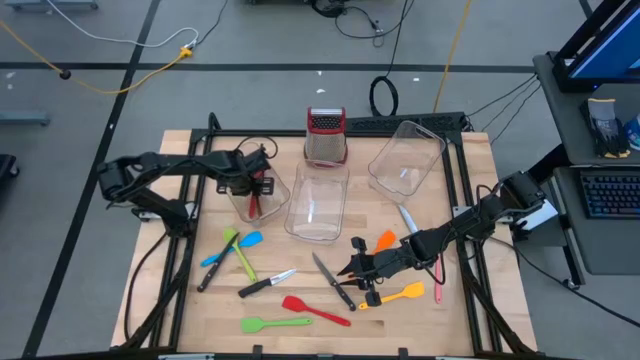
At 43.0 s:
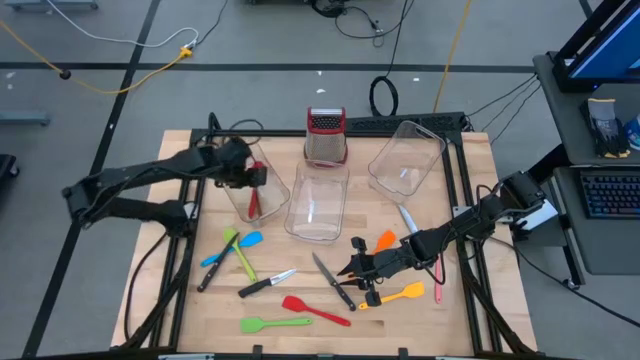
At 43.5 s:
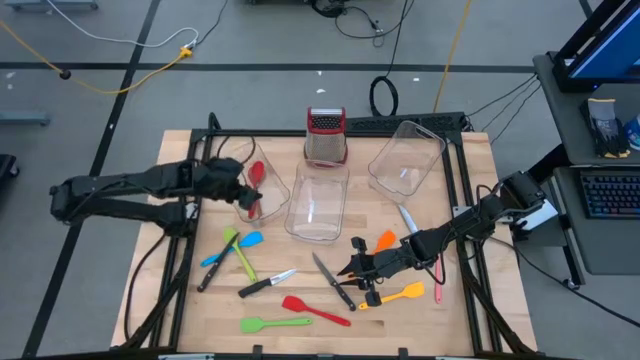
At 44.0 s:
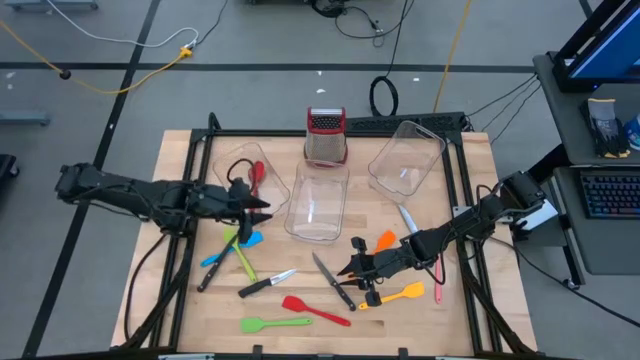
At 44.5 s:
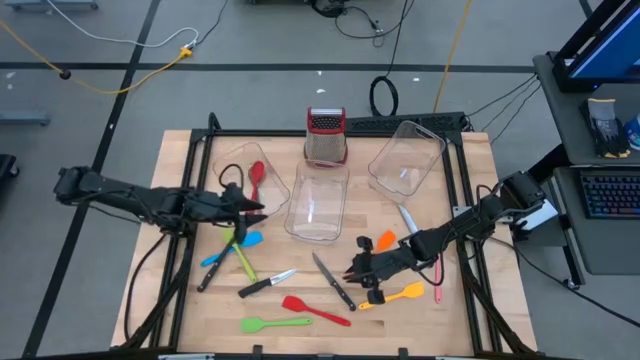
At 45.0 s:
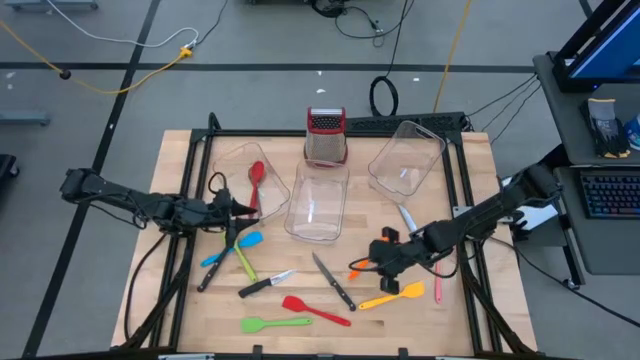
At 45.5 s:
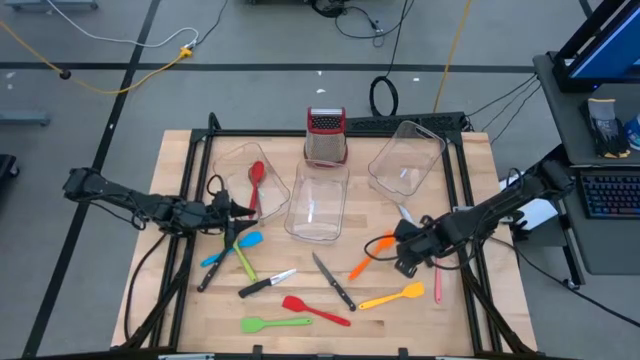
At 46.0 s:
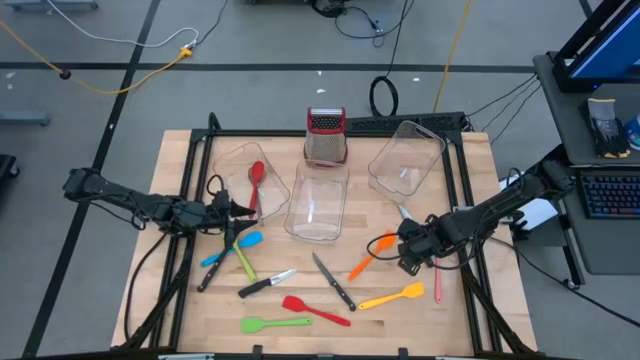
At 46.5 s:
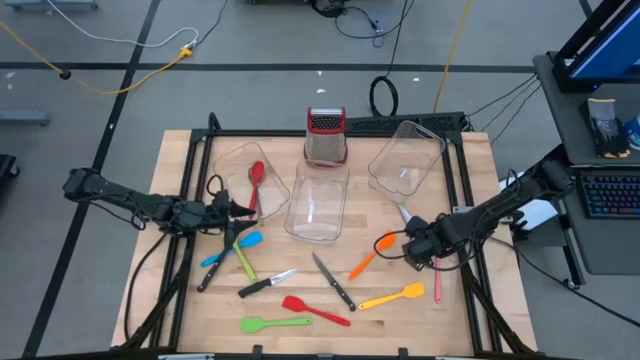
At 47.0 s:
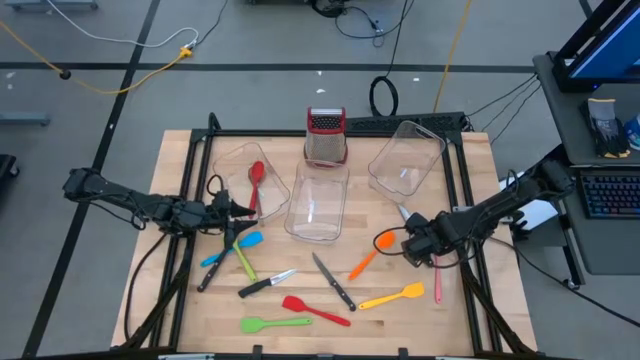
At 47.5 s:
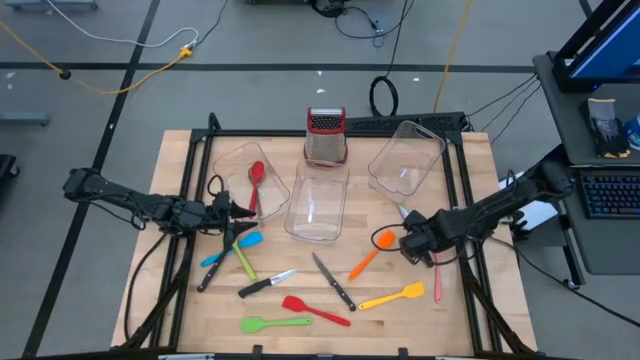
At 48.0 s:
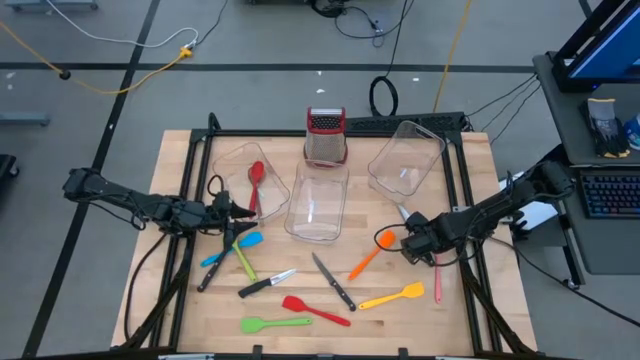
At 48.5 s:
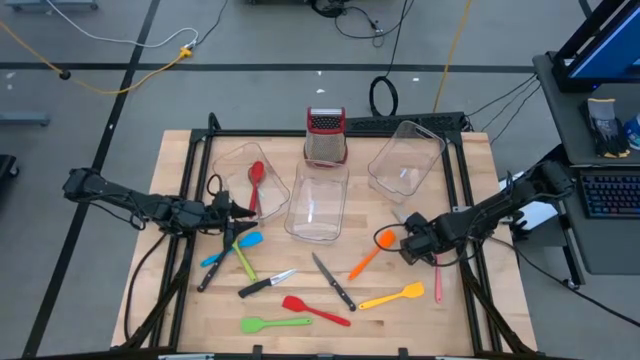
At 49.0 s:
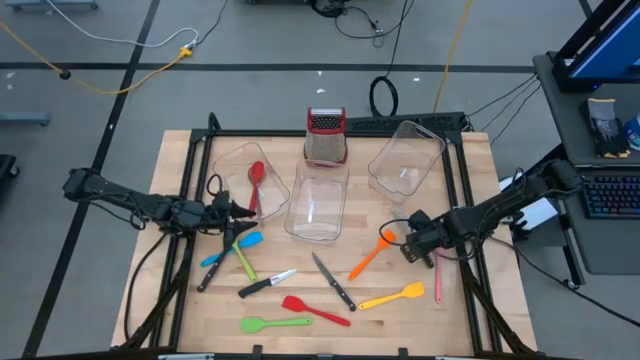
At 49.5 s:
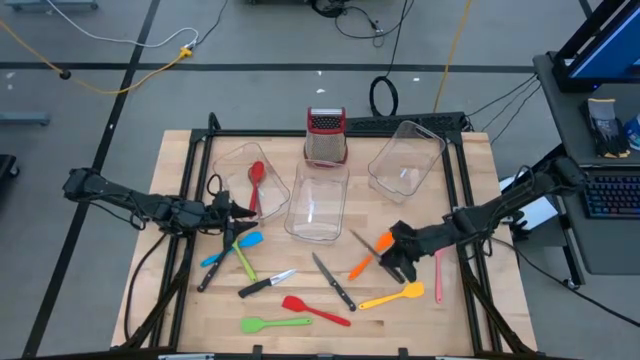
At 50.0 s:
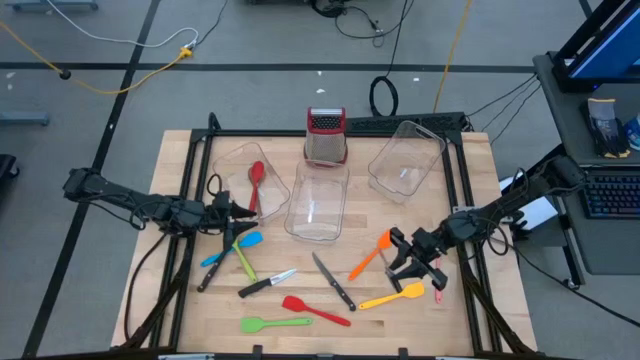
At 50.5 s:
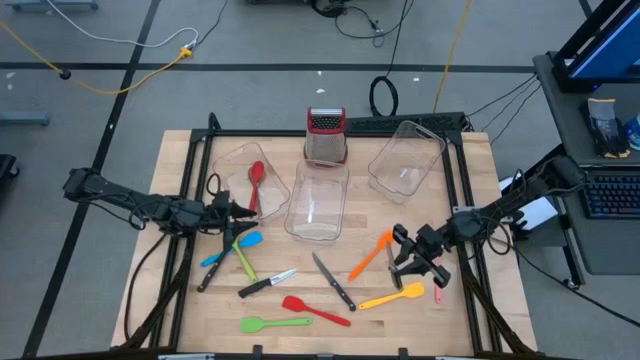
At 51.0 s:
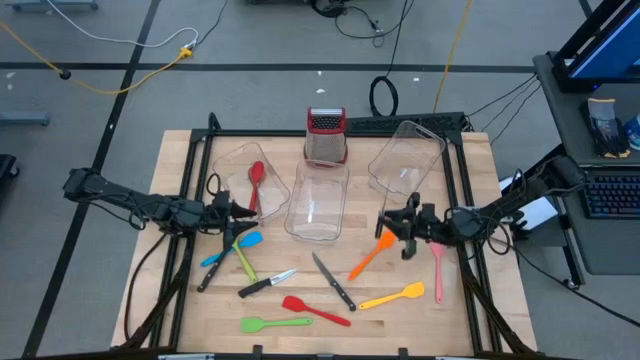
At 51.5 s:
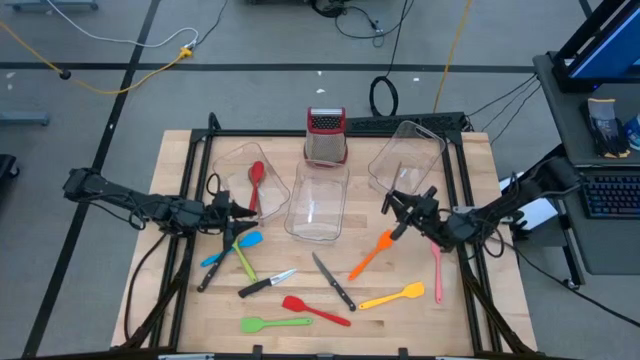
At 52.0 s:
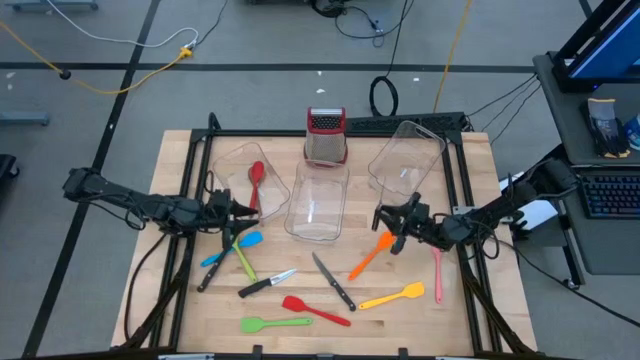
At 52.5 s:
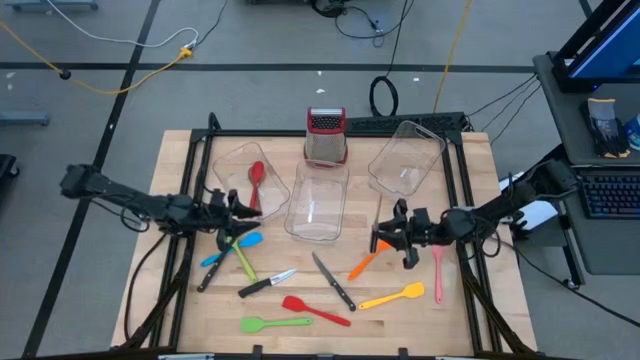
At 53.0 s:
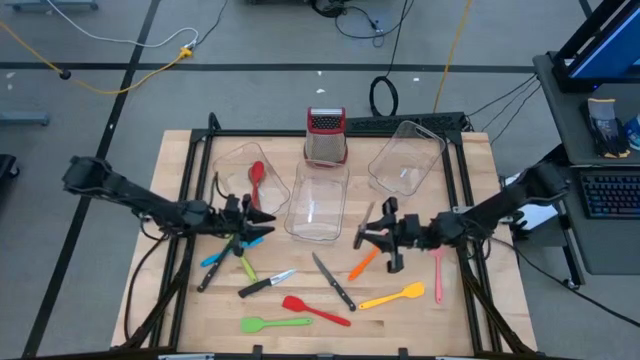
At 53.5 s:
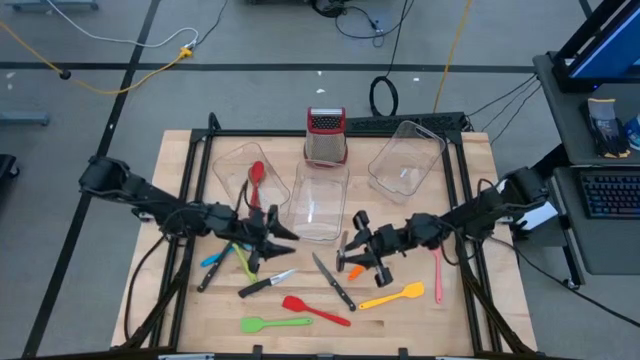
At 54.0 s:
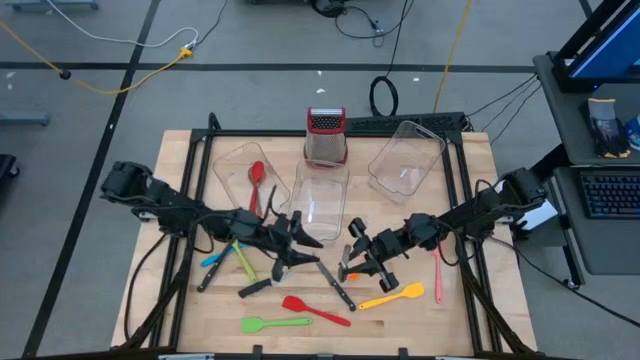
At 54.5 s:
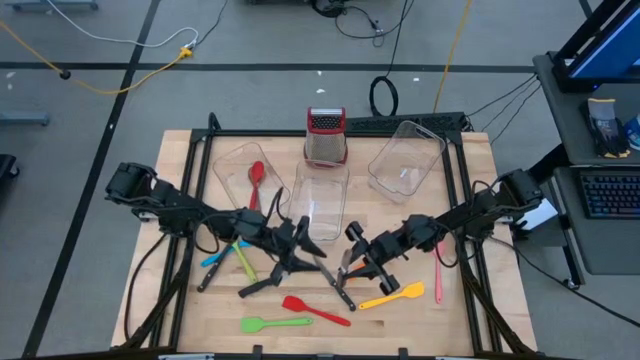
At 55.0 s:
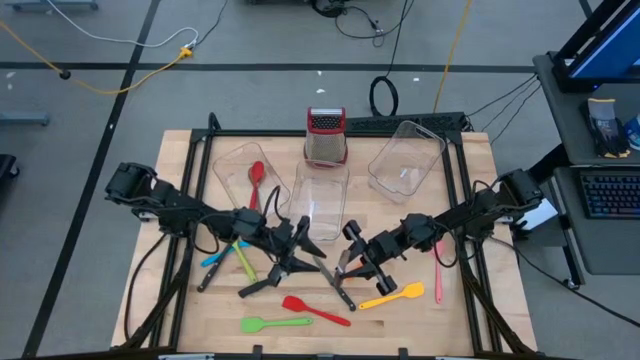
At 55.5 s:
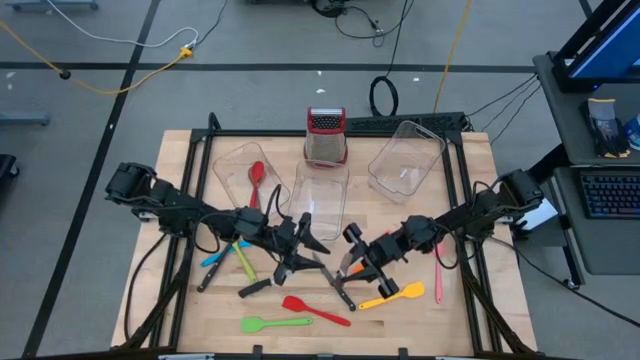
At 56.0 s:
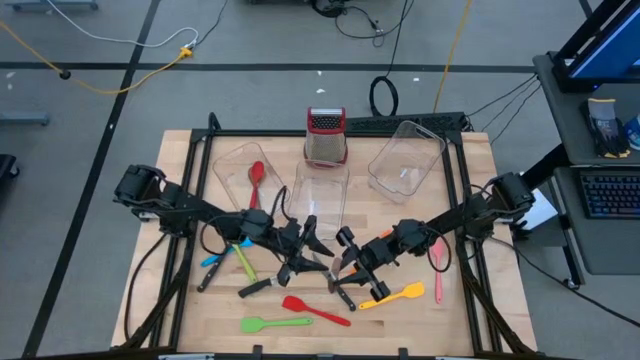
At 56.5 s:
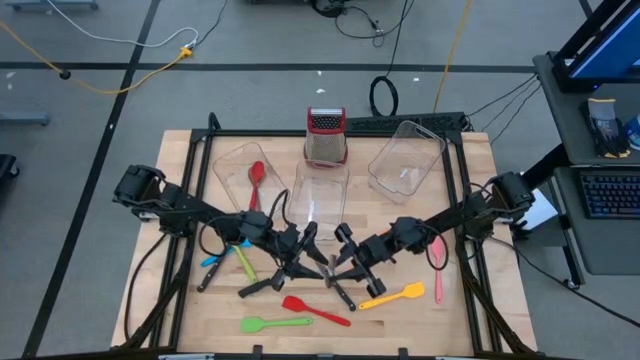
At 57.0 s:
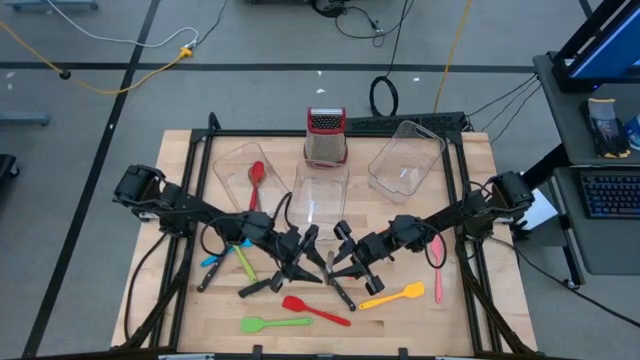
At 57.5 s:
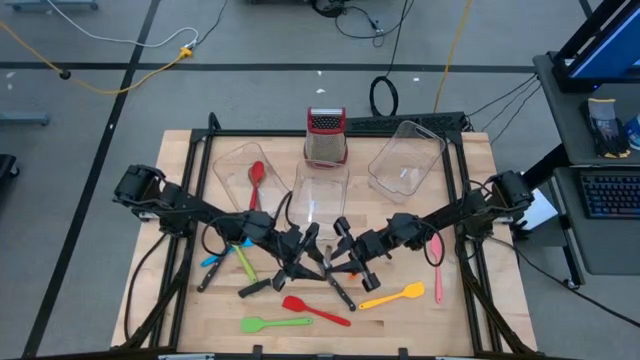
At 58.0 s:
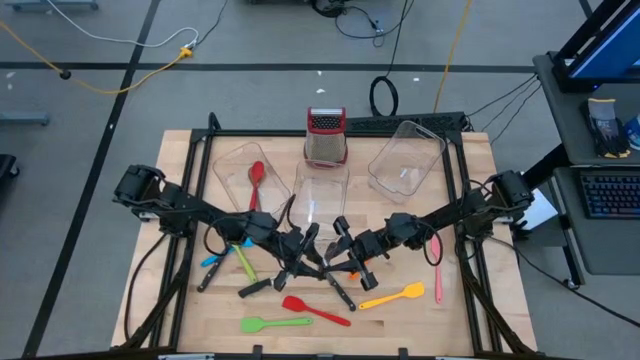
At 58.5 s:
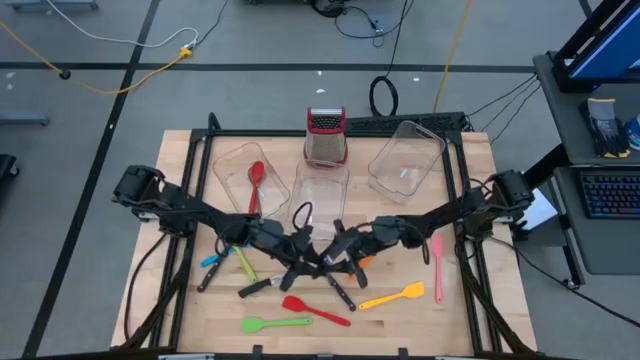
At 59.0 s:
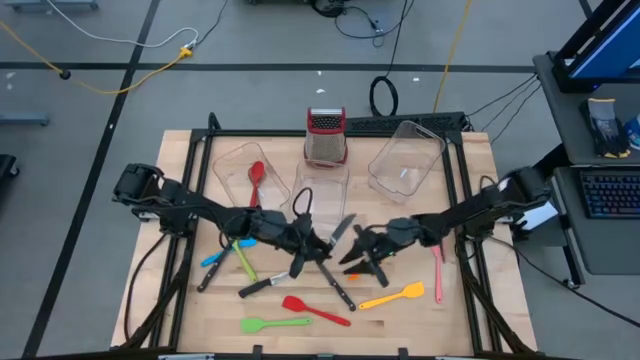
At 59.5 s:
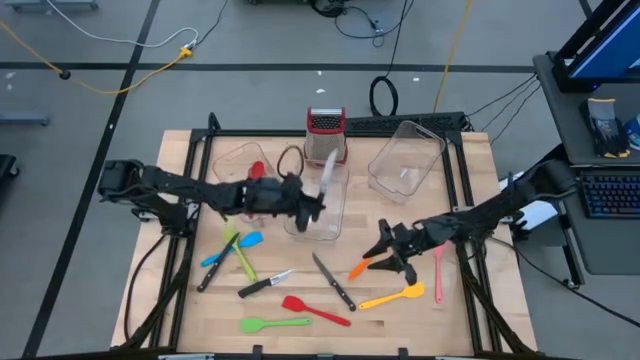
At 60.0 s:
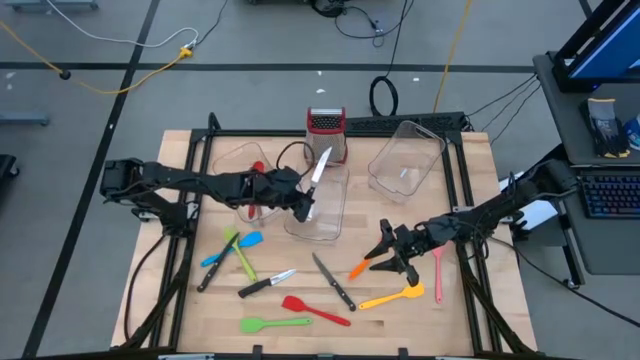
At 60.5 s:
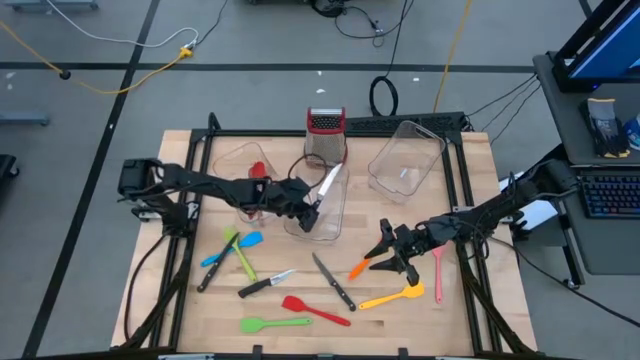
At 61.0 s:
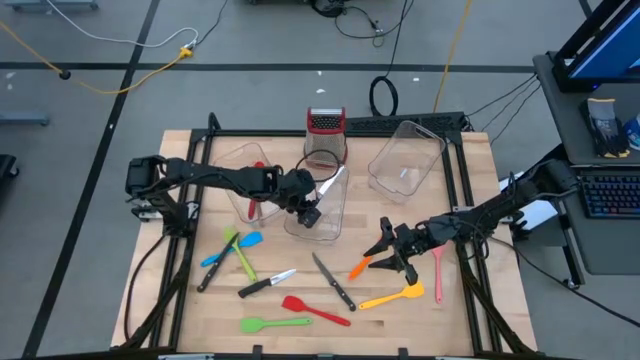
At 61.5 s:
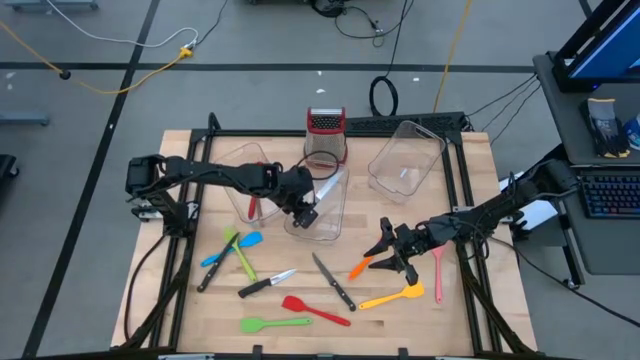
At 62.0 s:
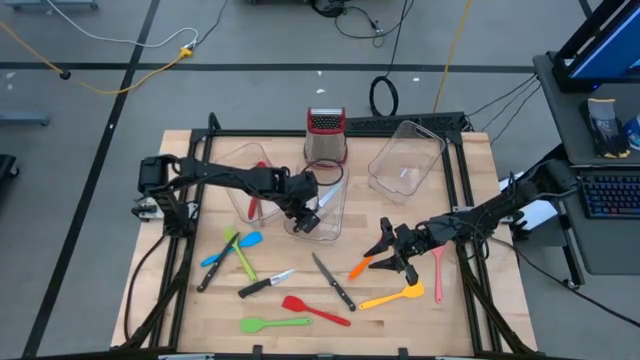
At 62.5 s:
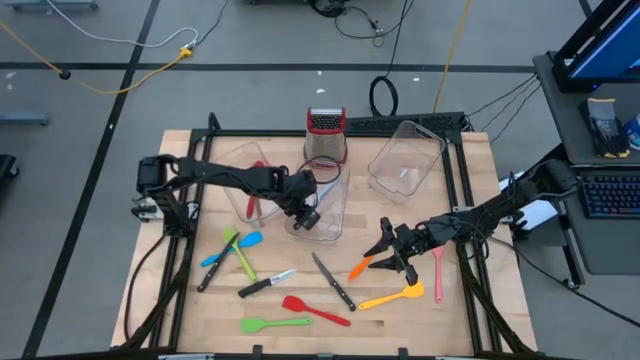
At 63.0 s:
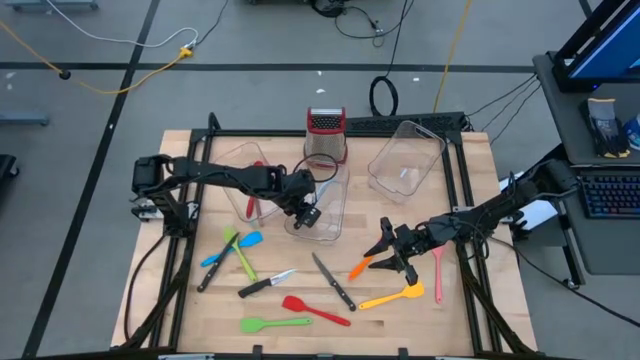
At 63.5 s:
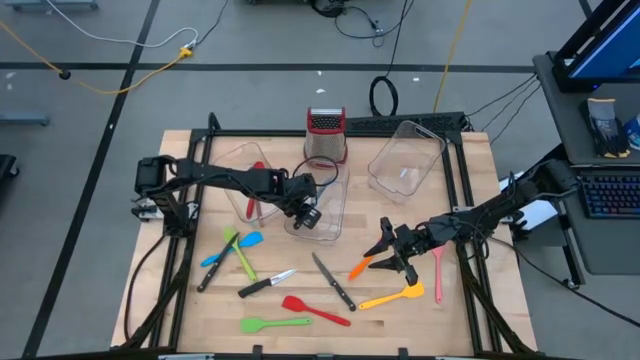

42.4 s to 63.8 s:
Task: Pick & Place Kitchen Items
Put the black knife into the middle transparent bin

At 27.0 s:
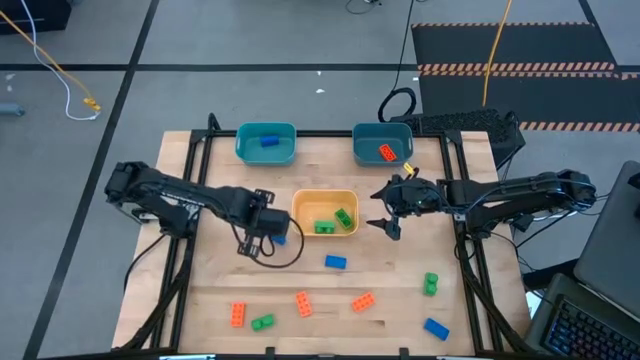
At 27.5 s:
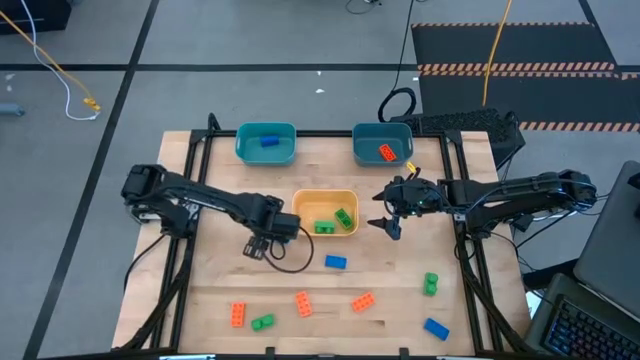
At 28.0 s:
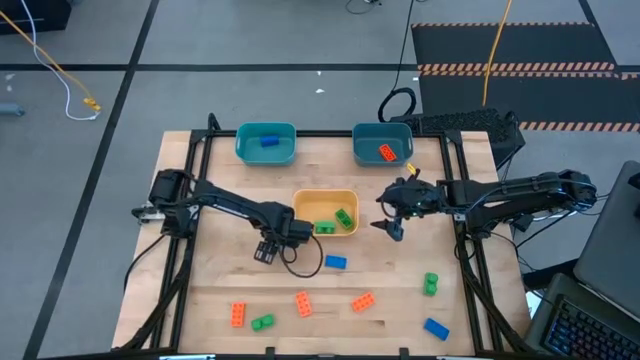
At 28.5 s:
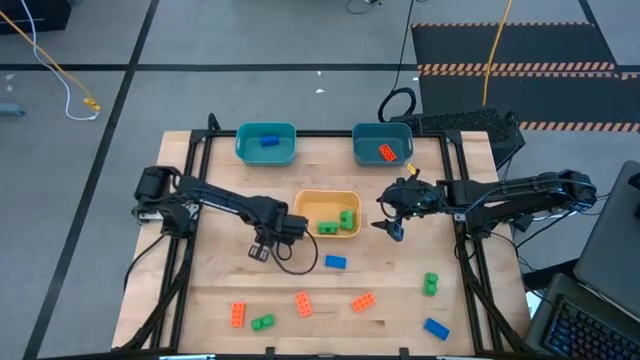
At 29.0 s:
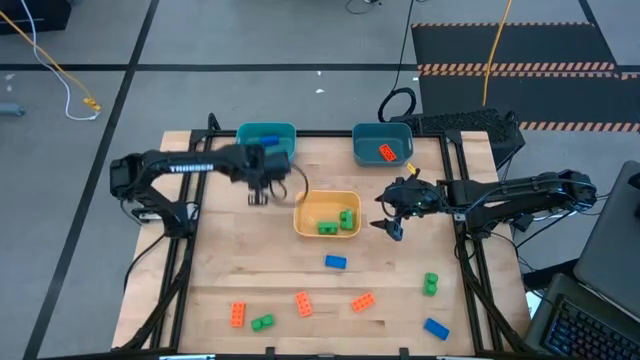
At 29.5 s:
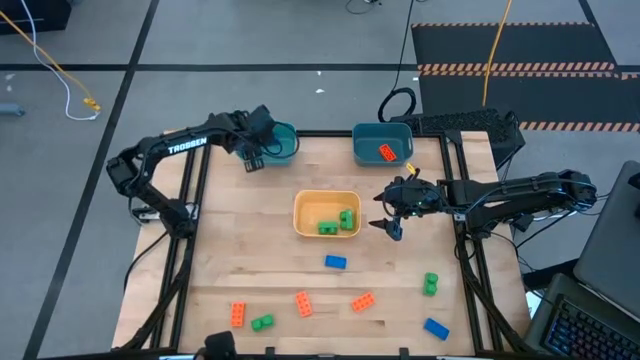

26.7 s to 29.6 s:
Task: Sort & place blocks by color
Put the blue game piece into the green bin
